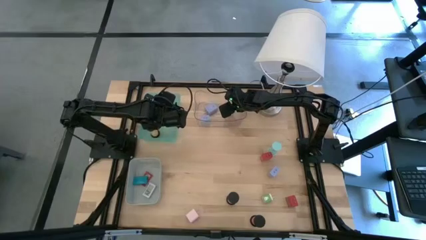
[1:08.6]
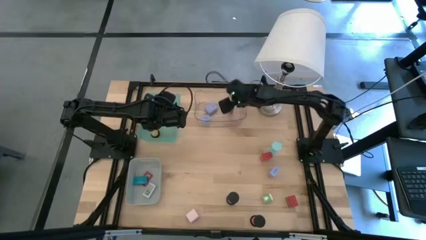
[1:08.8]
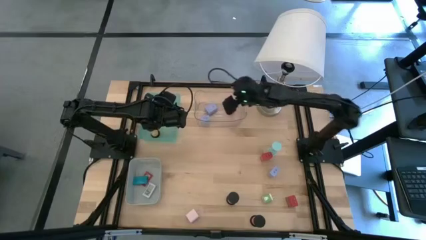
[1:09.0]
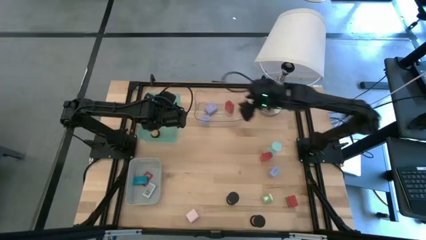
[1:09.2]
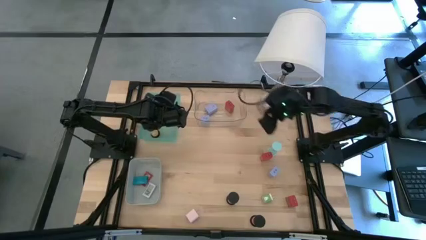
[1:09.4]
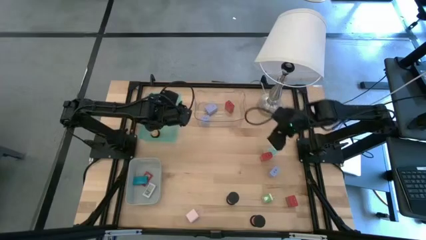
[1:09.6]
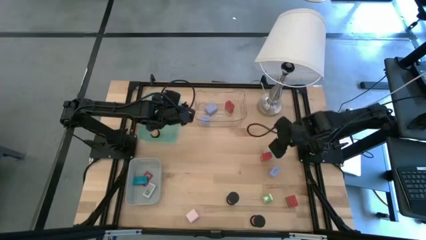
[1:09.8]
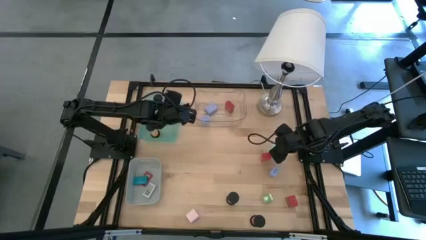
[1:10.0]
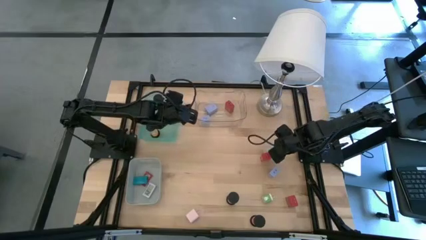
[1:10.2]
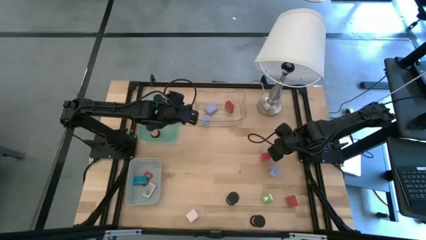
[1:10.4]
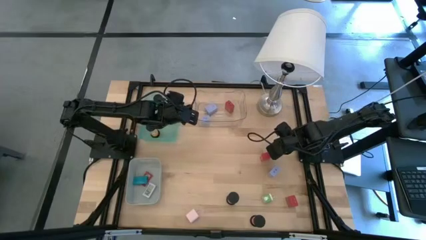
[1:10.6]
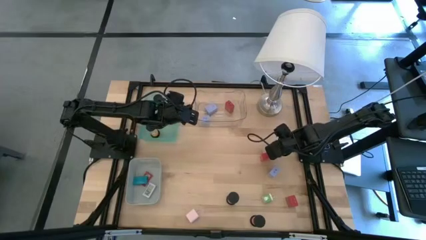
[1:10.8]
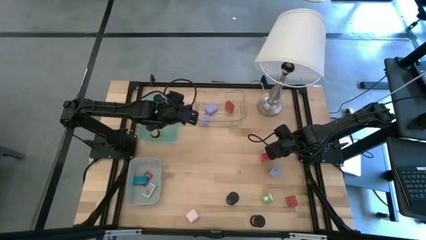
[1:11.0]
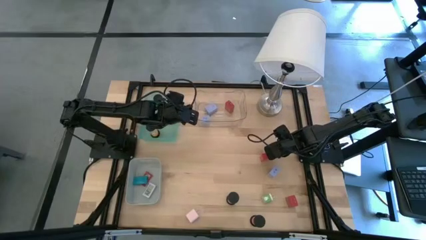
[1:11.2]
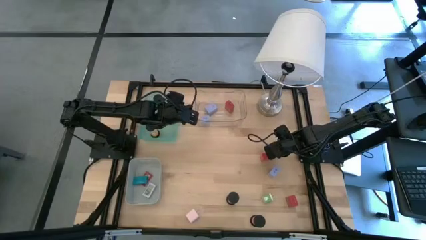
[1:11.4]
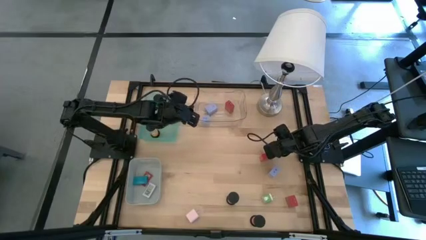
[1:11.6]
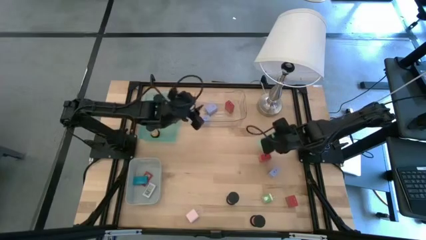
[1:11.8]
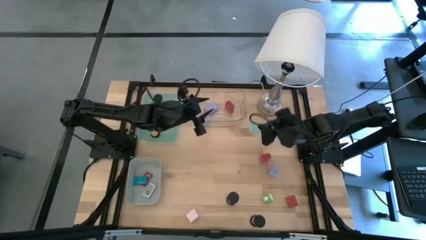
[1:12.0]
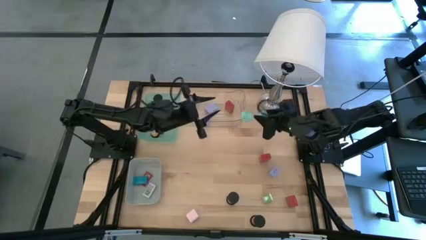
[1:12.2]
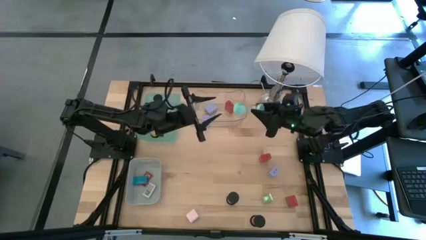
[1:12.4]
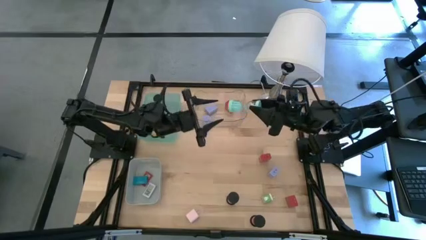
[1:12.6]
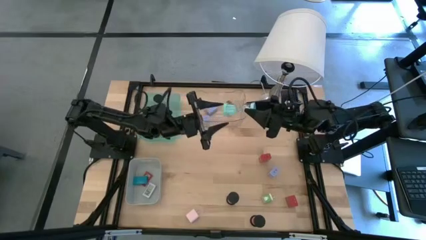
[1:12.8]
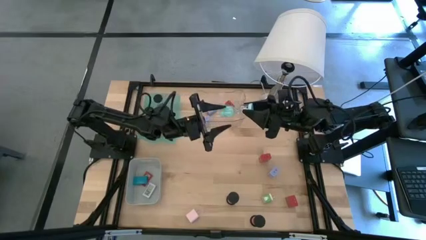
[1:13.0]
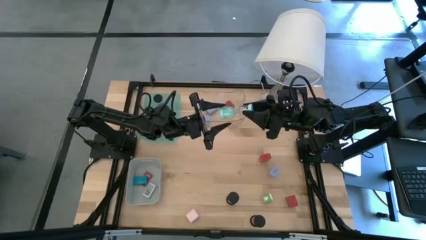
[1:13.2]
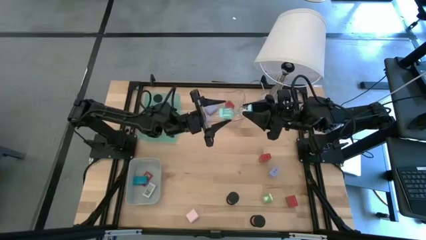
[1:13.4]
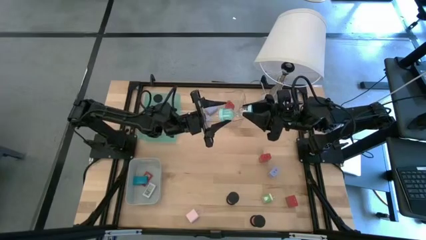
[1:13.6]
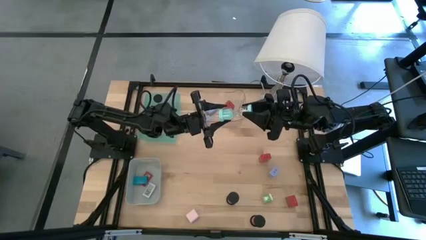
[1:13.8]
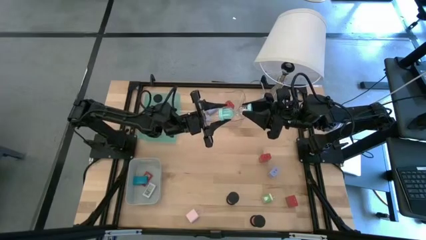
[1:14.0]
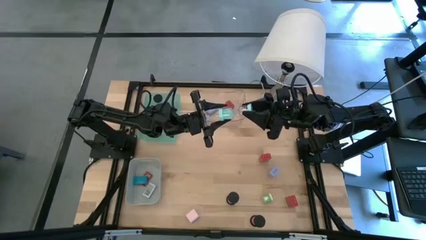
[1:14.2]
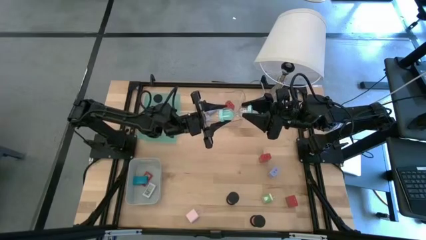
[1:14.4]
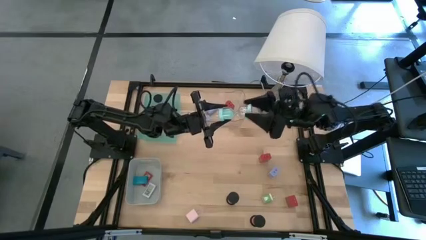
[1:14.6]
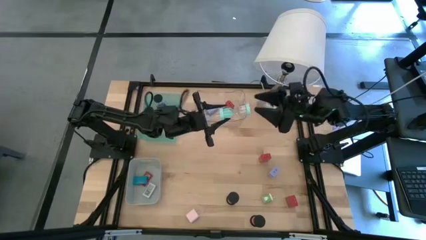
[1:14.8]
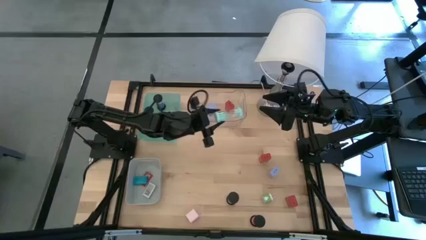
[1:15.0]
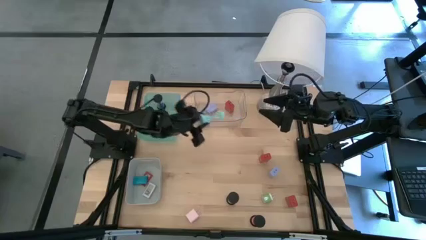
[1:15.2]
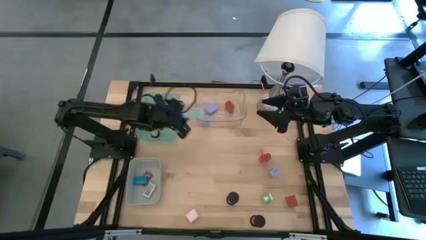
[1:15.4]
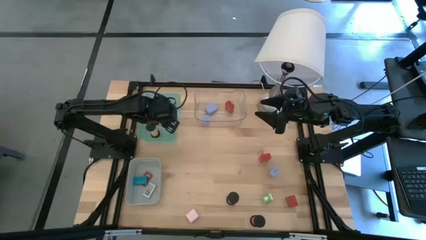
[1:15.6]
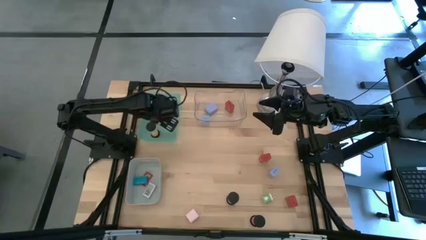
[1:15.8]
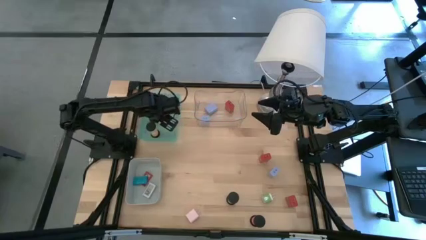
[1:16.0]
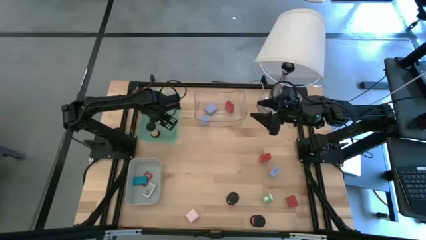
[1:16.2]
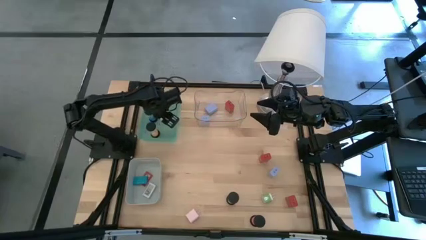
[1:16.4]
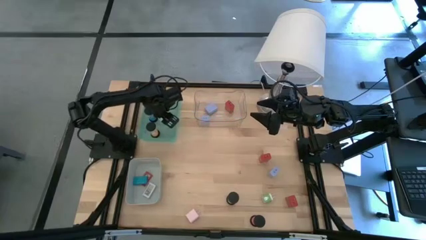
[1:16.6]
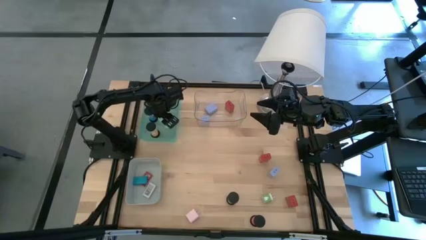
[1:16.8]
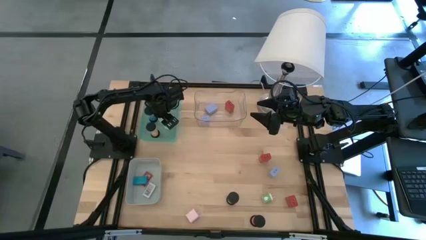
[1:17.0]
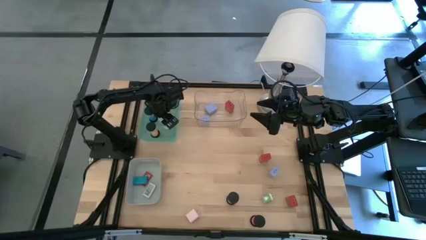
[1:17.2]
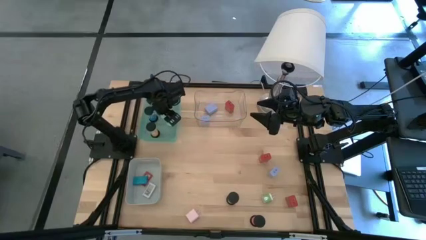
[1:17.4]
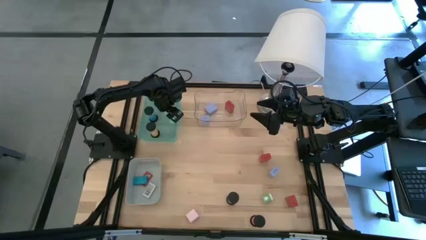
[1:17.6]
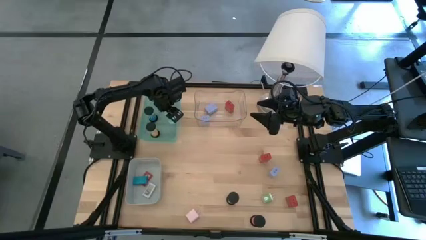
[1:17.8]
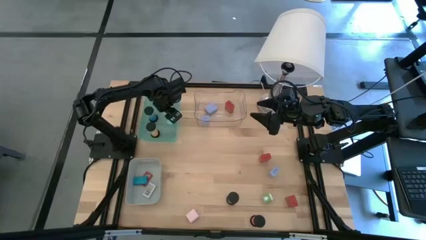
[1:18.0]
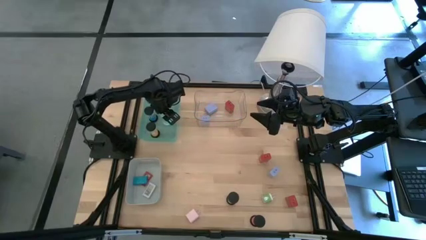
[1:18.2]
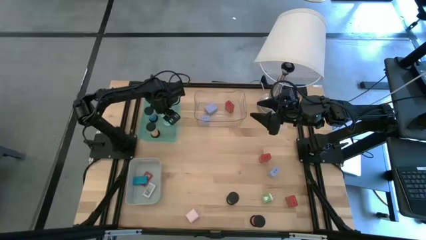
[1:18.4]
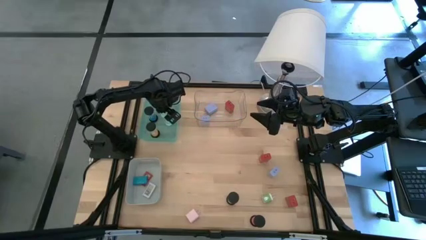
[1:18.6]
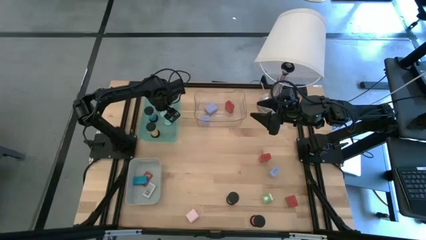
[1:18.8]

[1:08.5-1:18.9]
Task: Pick & Place Office items
Put the light green hourglass into the green bin

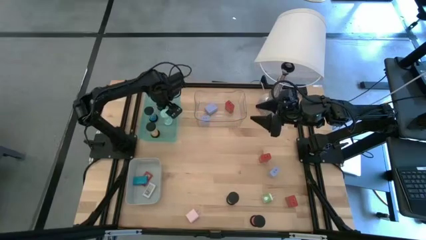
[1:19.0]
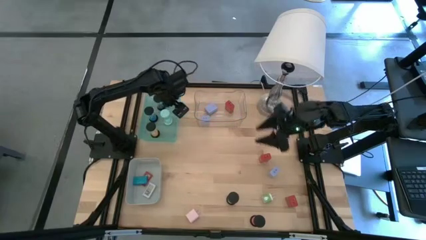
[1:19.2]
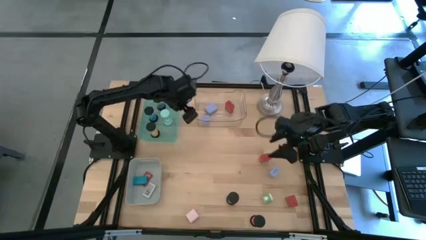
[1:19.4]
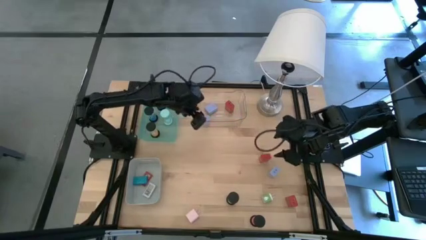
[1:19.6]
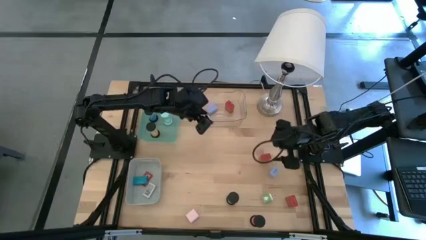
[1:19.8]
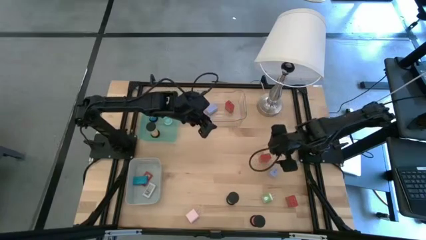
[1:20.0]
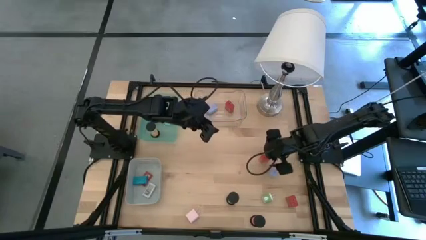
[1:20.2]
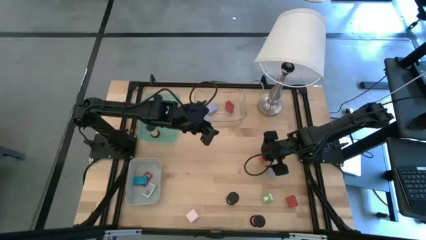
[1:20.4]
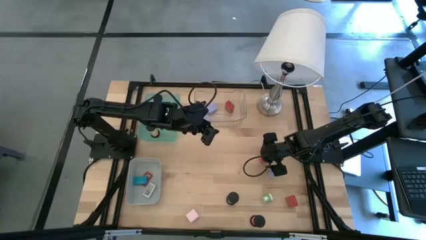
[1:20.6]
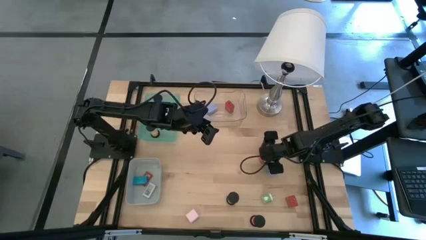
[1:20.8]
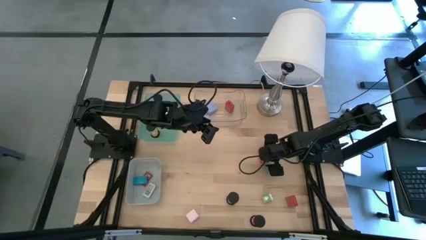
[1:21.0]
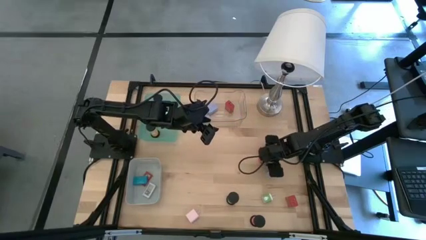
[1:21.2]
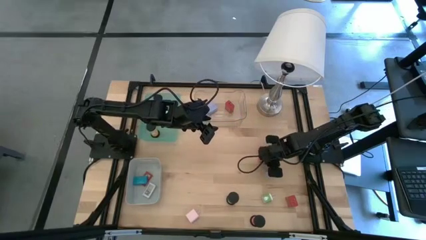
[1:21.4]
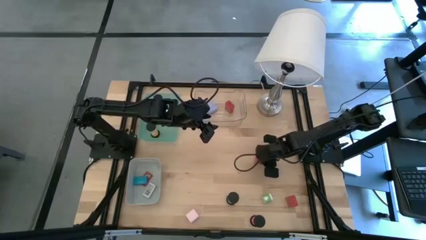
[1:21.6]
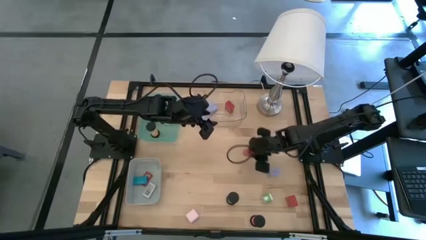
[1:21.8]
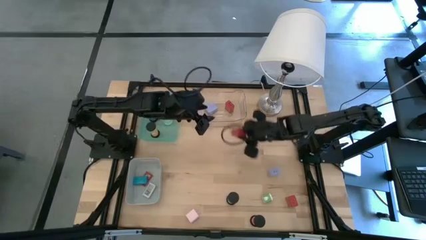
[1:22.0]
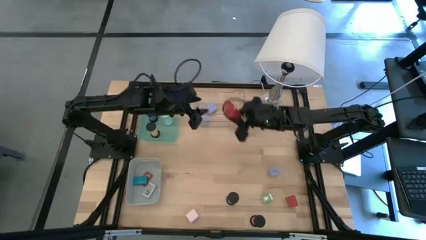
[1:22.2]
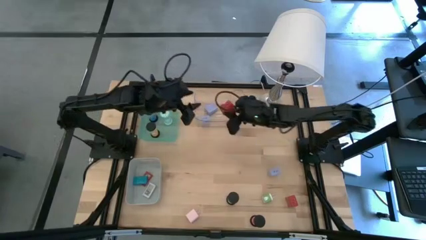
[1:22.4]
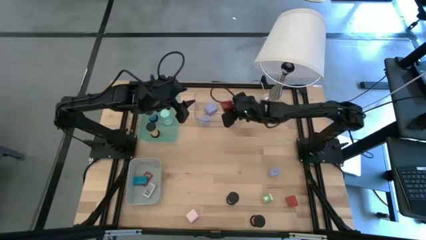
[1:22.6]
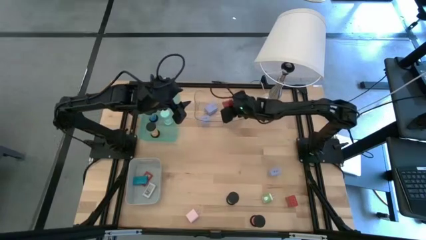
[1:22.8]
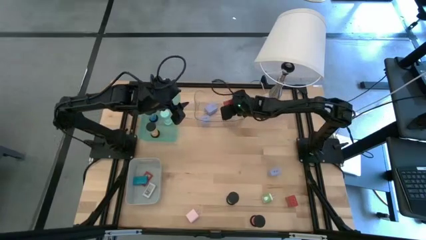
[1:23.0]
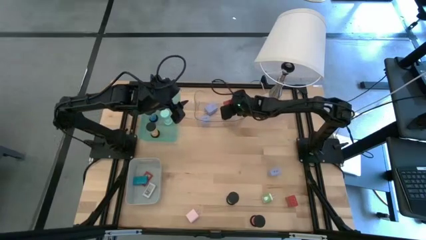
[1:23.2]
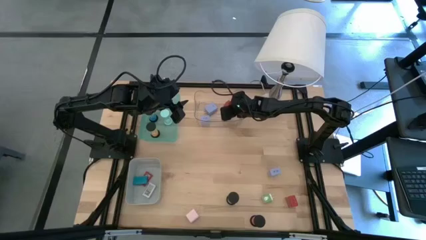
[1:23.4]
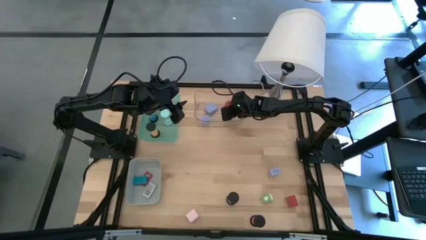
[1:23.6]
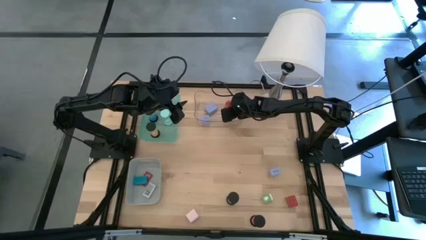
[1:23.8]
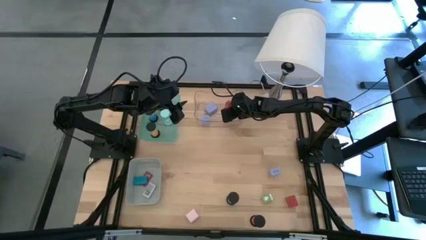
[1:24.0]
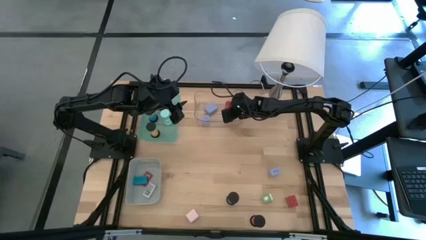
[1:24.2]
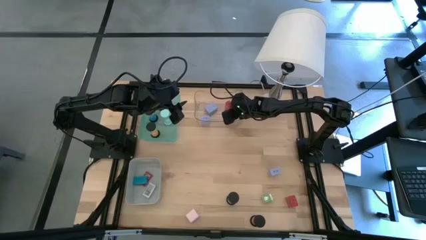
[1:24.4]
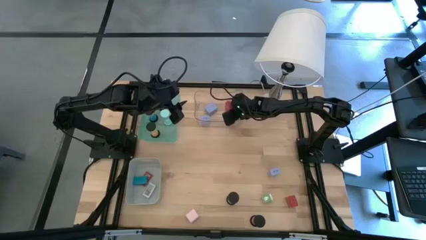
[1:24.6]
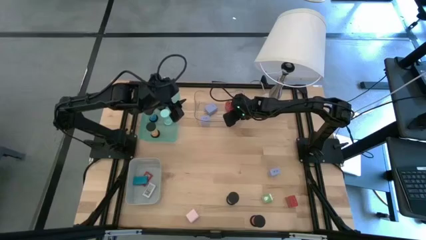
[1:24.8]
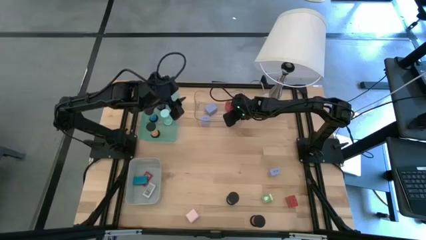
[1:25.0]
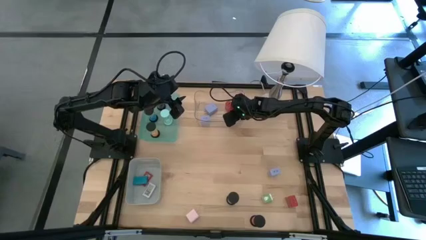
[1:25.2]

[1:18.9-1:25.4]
Put the top red charger adapter into the transparent bin
